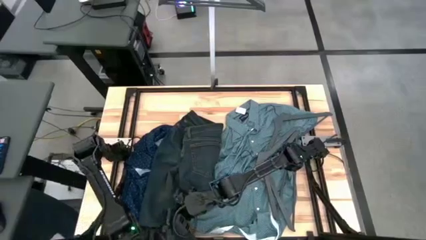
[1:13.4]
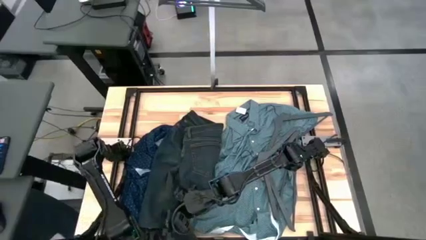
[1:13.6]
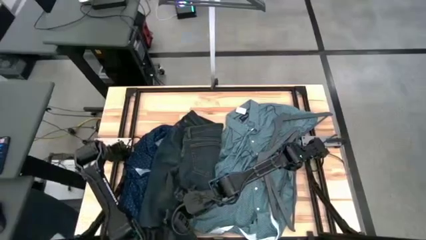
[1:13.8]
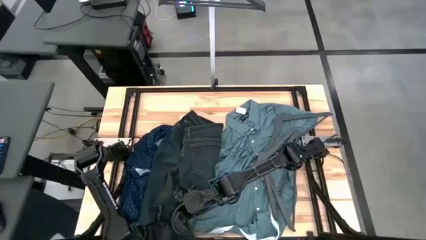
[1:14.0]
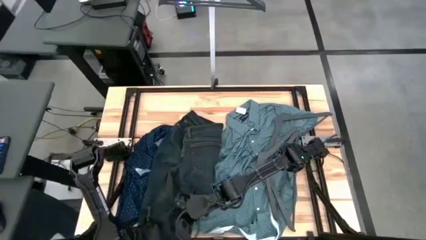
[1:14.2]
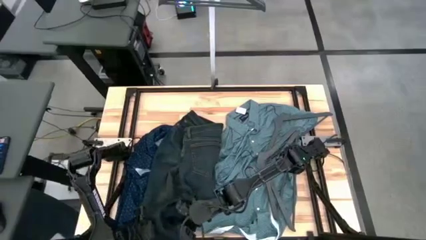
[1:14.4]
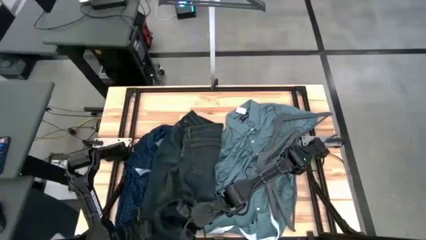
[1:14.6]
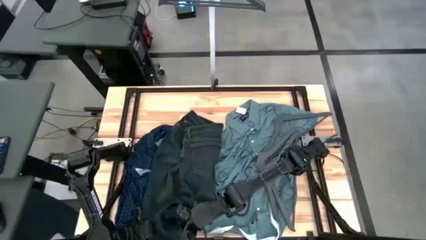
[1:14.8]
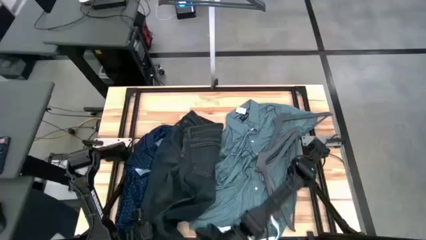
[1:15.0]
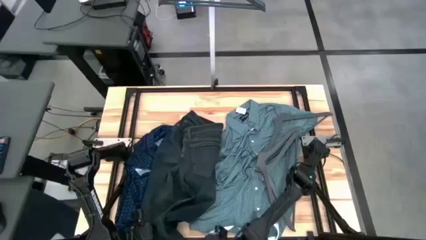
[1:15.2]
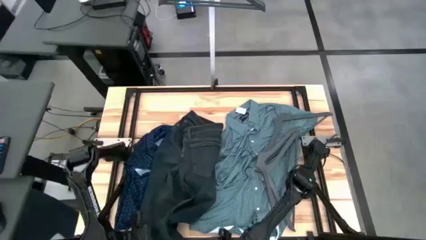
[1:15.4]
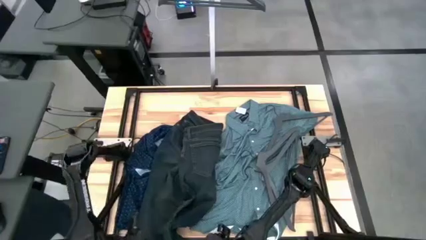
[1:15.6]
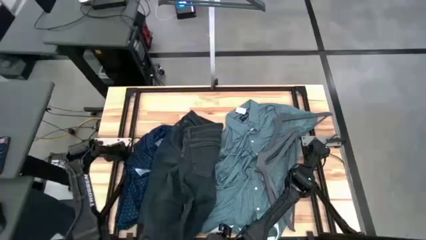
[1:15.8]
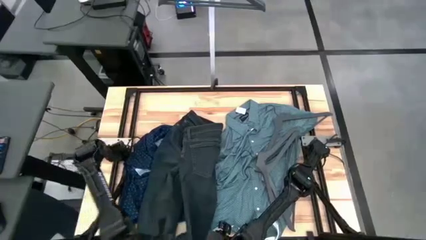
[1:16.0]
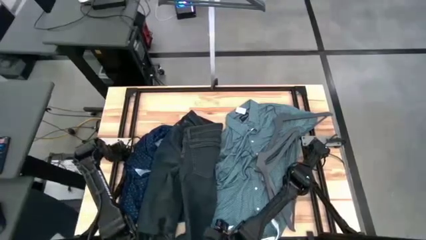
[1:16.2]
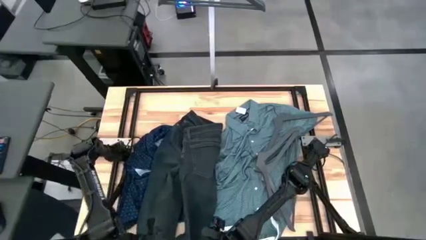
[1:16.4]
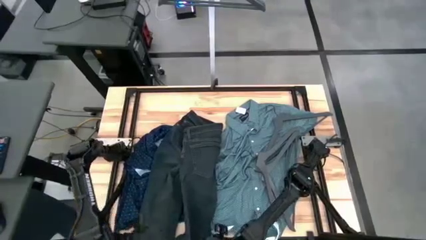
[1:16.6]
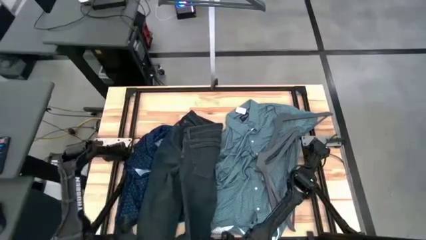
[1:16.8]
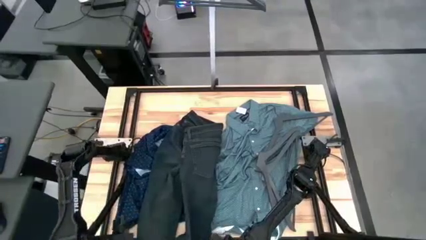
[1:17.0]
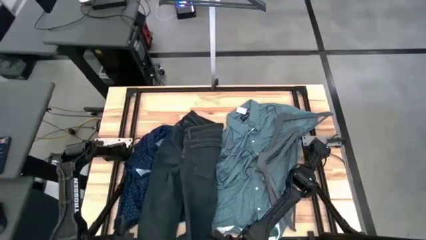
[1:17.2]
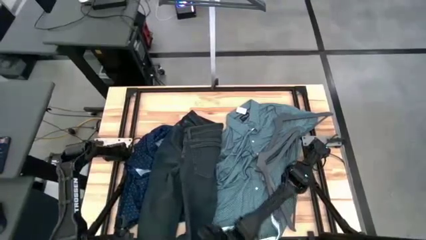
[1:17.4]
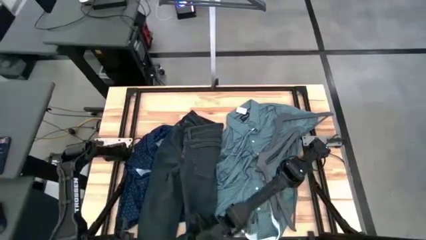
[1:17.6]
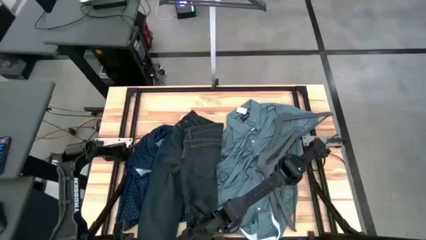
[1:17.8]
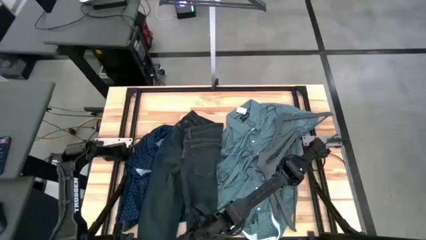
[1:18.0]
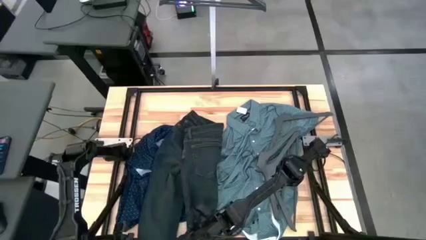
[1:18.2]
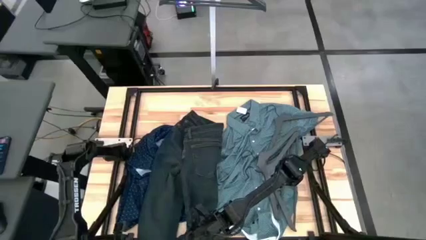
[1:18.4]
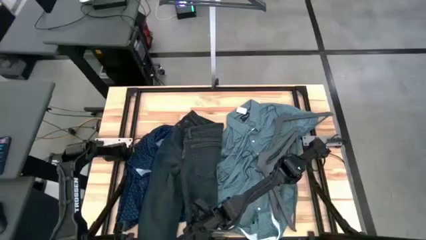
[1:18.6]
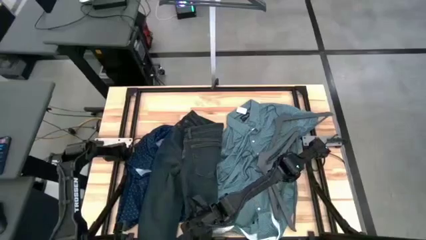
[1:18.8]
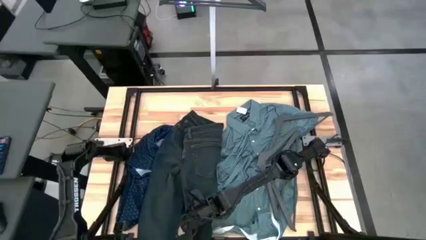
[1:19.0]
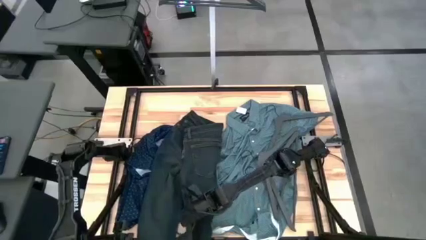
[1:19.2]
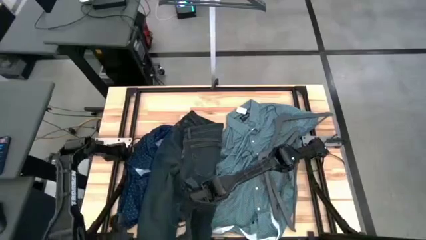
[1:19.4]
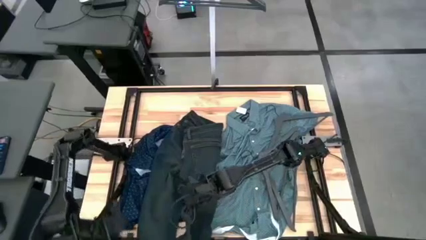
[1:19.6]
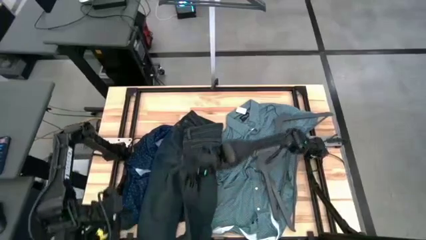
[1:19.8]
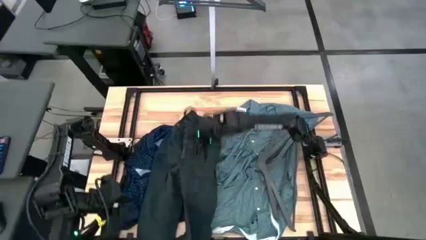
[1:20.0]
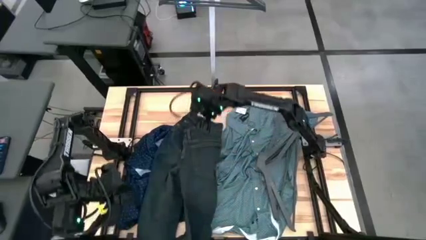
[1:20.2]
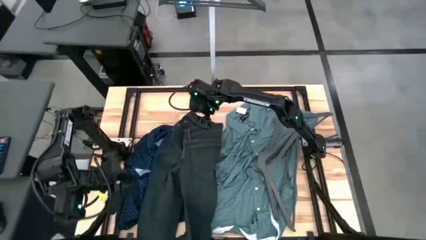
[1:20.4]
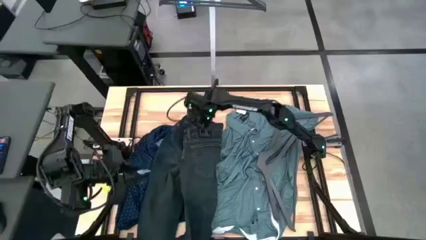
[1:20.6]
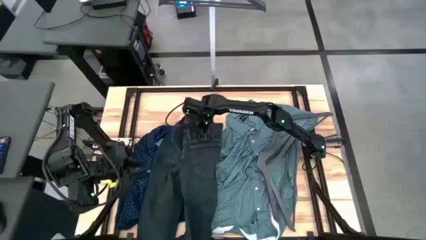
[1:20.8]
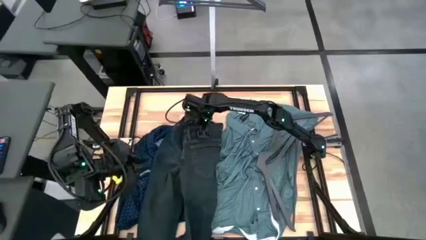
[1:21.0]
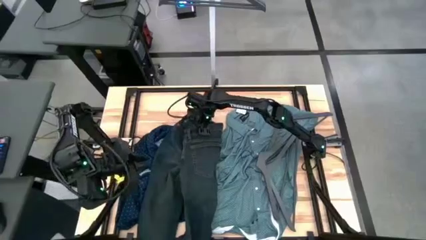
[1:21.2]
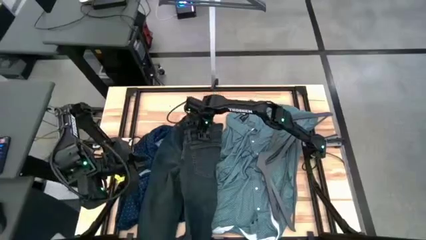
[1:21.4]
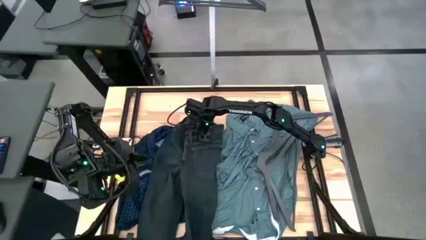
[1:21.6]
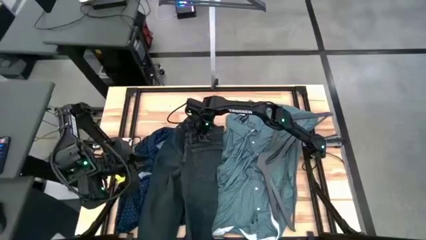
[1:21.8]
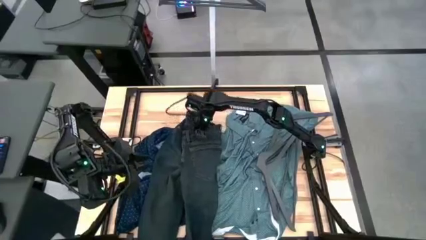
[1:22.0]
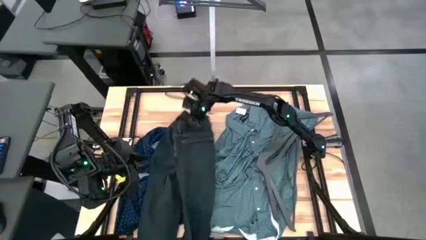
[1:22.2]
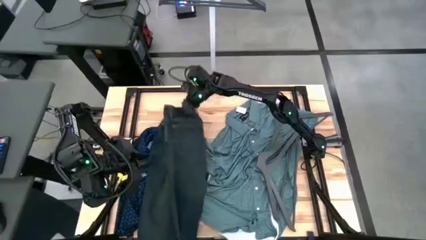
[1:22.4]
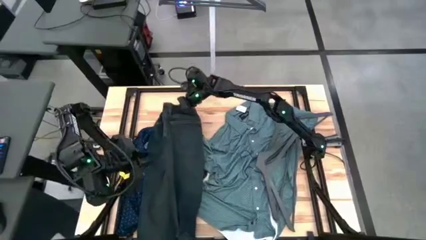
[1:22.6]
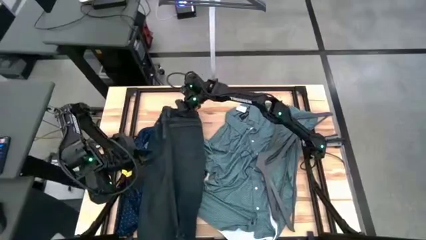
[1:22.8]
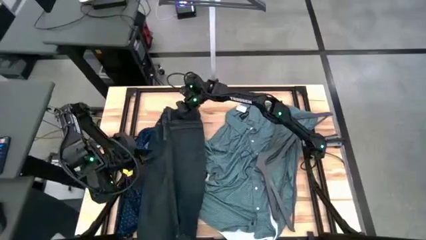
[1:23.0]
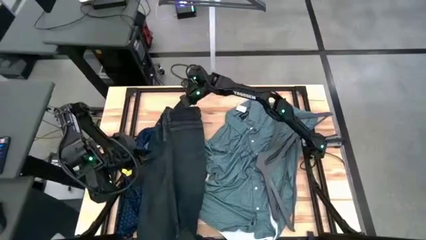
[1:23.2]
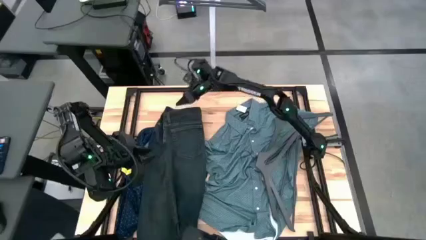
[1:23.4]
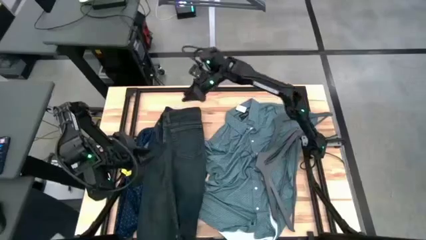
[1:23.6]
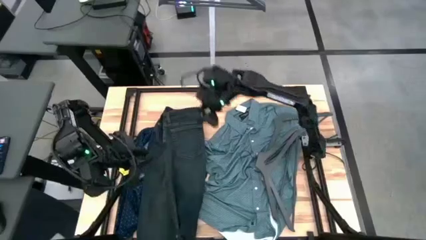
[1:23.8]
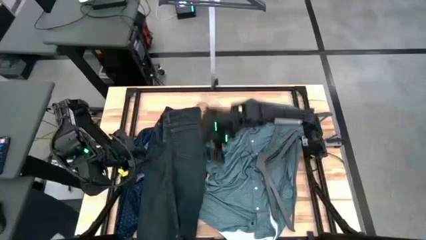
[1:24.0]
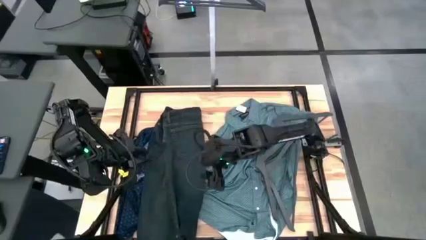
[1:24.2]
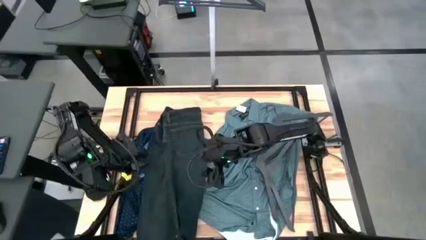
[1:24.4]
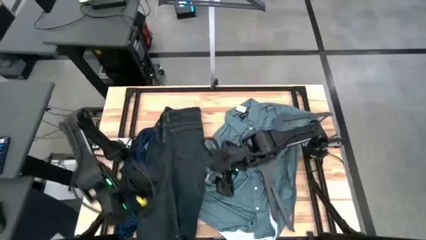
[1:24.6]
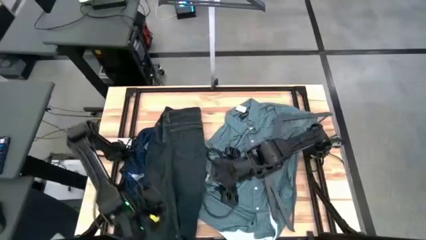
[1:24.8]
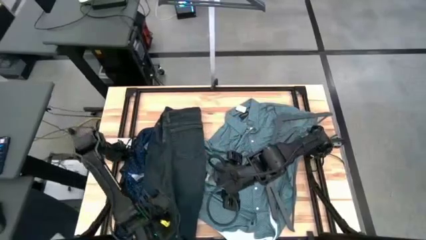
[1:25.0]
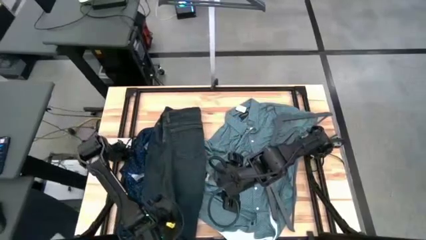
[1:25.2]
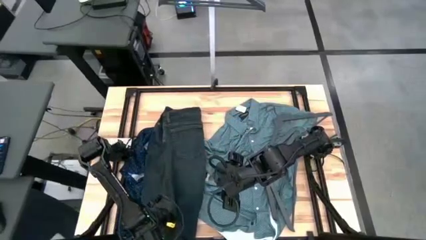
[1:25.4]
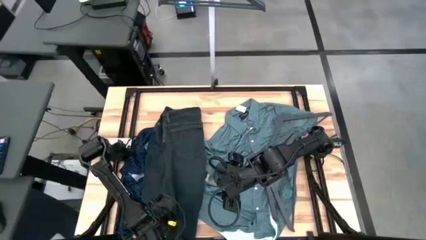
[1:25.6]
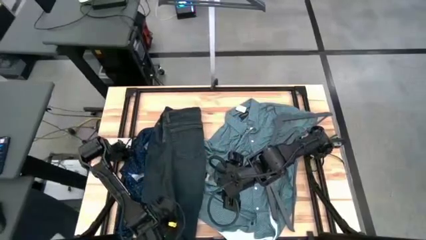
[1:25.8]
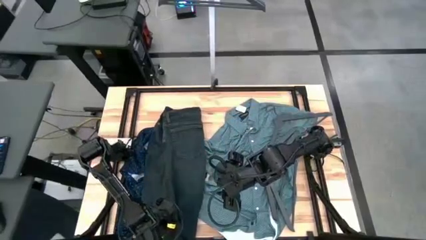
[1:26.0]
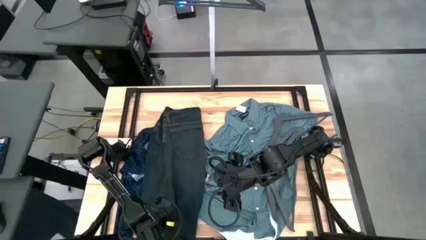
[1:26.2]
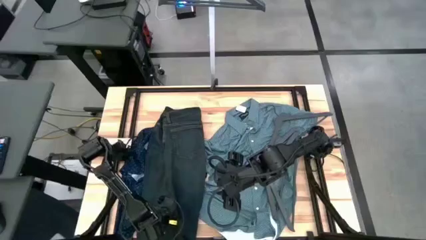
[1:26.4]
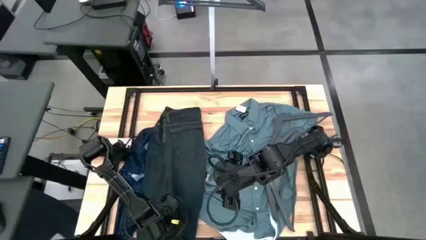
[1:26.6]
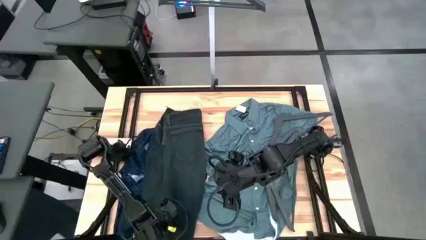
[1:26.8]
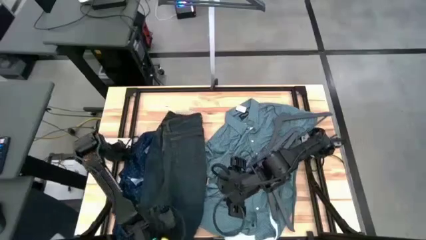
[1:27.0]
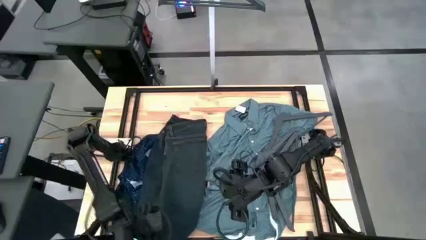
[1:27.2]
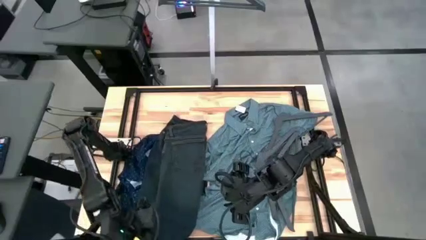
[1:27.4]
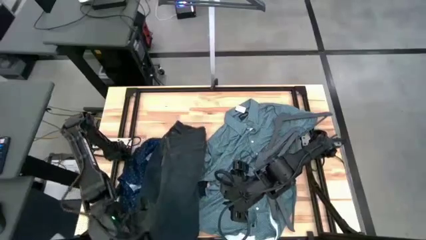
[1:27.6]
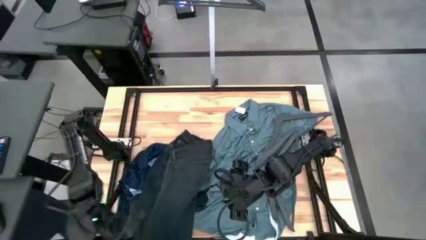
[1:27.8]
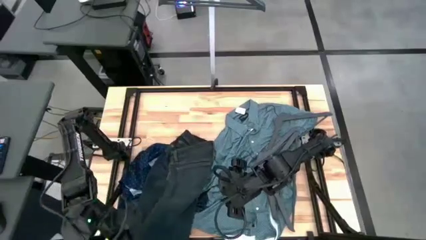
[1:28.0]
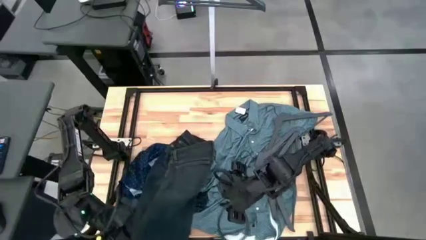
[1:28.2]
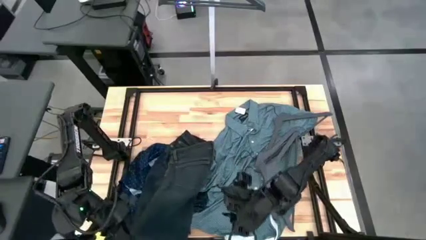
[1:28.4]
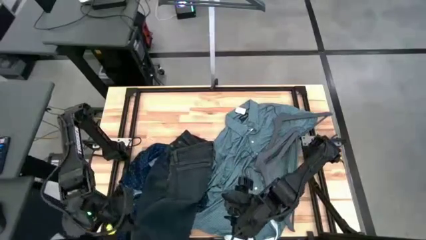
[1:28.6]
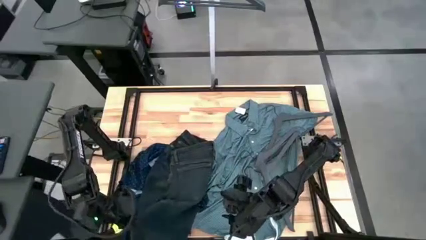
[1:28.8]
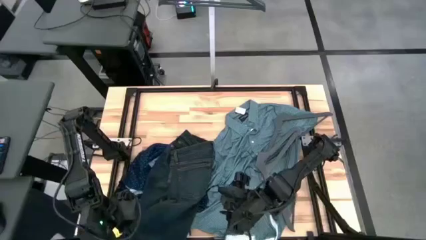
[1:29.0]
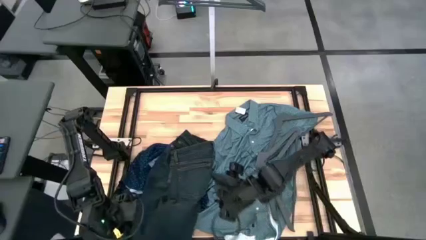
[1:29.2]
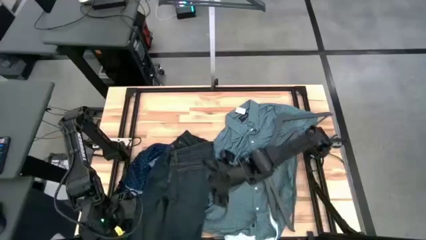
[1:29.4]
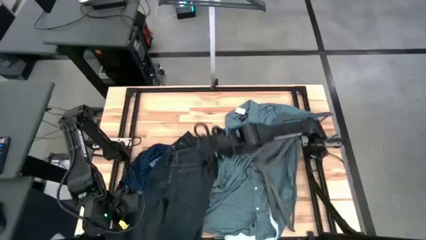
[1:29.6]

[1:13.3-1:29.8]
Task: Hang clothes
Hang the black pants on the rack

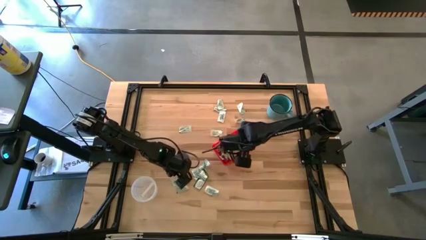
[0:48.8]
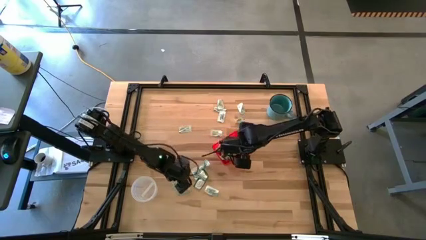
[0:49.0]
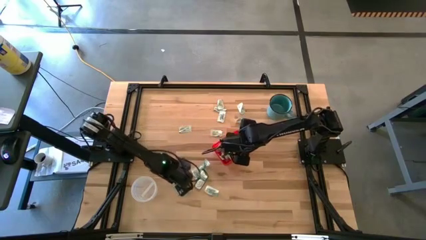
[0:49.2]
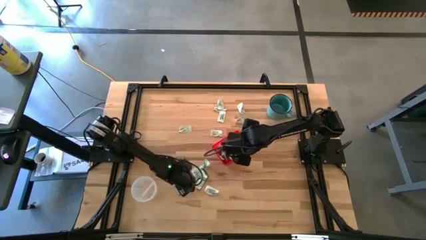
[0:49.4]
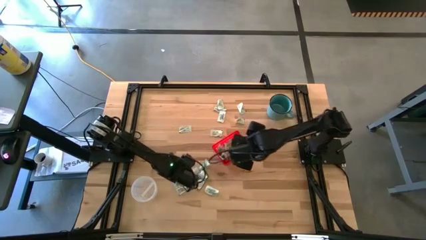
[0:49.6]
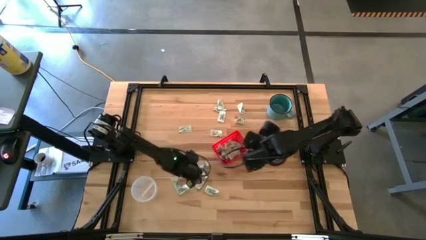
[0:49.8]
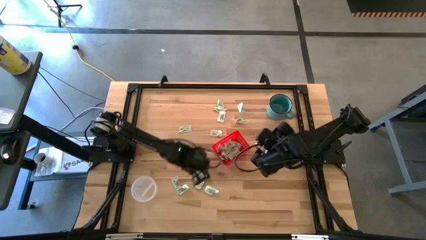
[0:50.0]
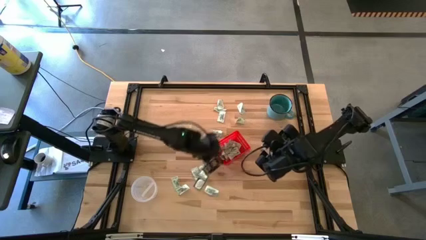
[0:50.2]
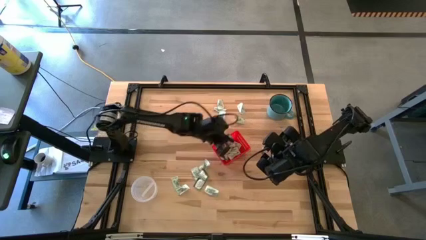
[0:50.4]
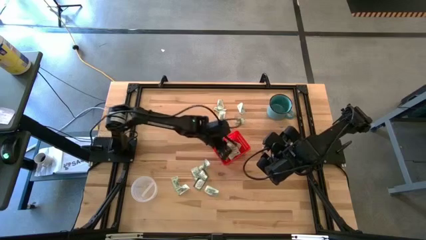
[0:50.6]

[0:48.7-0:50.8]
Task: Pick and place items into bin
Put the left green stevia pack into the red bin
